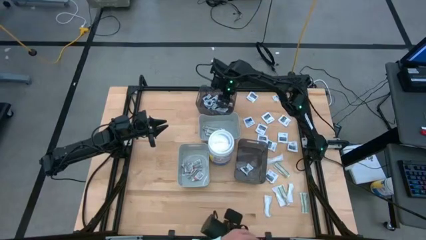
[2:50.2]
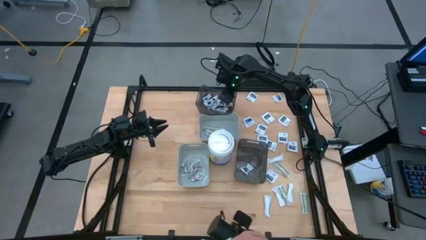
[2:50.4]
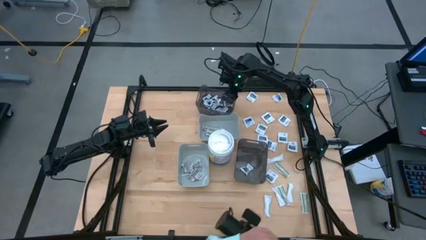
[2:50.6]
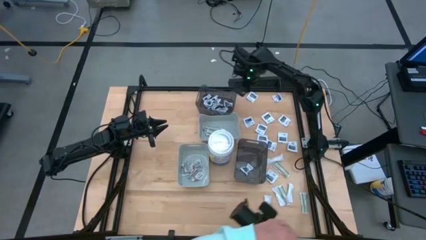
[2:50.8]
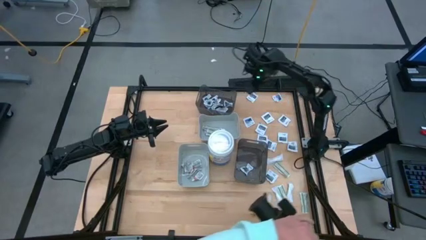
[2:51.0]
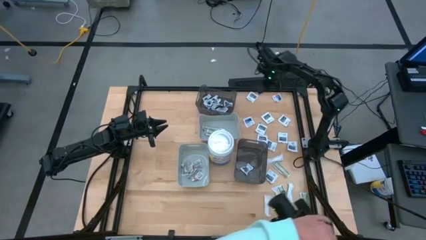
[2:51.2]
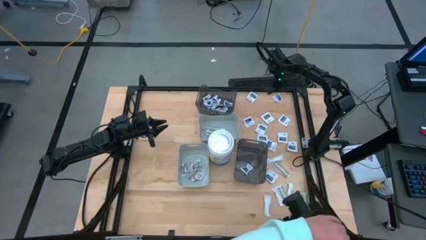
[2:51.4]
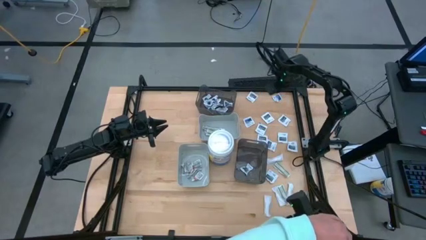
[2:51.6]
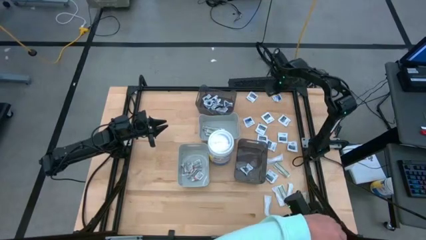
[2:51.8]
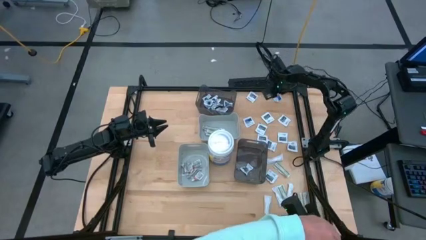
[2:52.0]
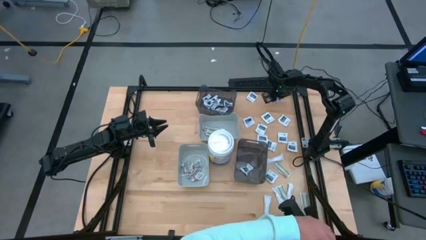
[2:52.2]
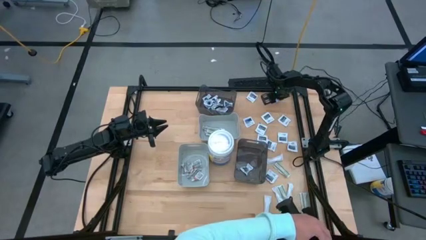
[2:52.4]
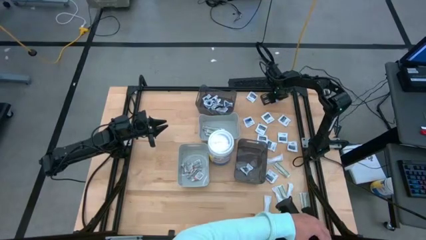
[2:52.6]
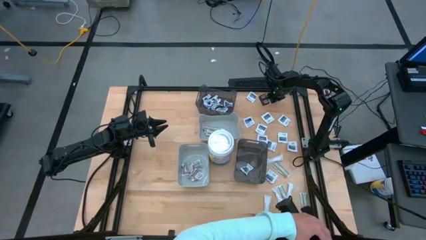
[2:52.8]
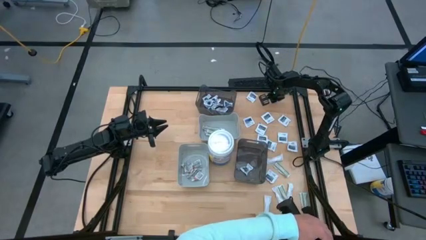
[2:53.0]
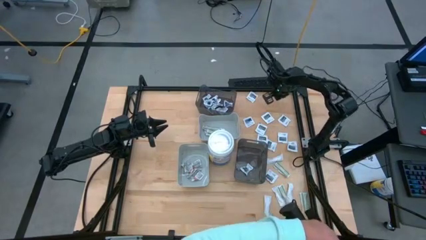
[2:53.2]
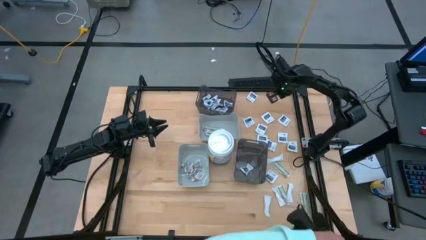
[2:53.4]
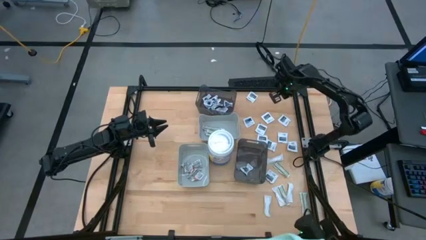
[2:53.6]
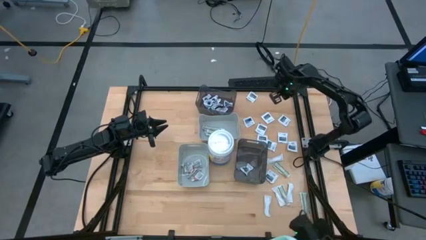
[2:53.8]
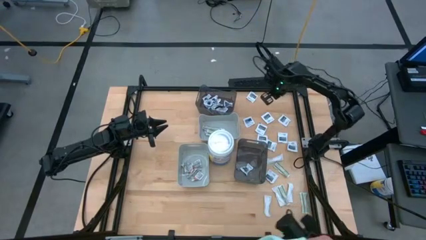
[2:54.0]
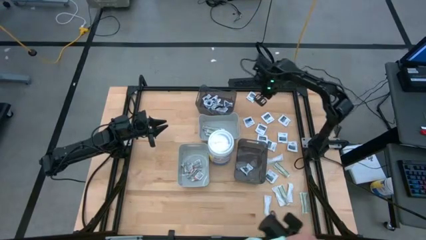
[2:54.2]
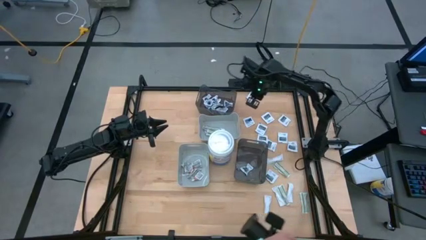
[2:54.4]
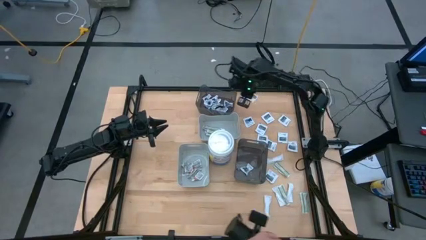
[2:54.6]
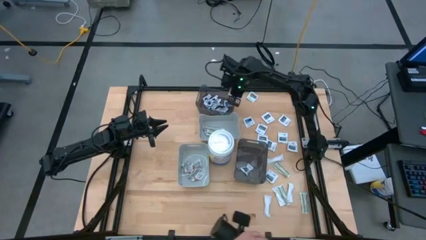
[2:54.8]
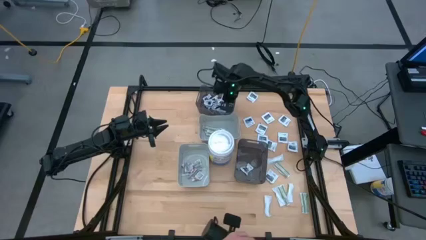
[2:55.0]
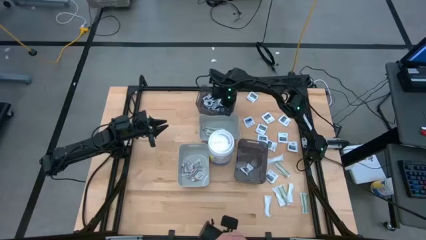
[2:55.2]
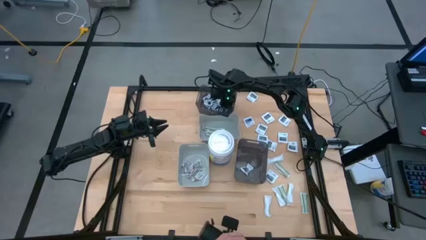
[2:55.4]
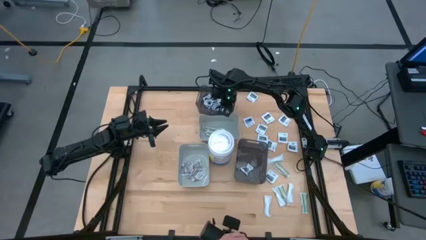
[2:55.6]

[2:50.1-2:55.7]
Task: Pick & Place First Aid Supplies
Put the alcohol pad into the top transparent black bin

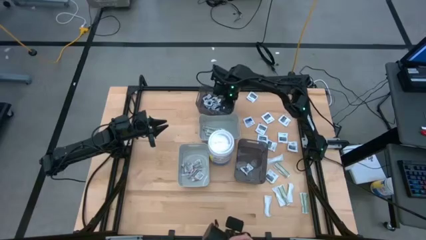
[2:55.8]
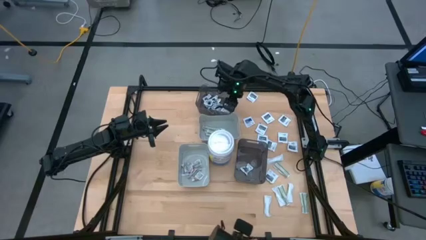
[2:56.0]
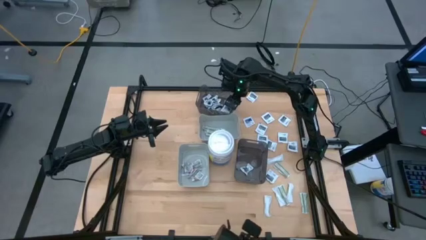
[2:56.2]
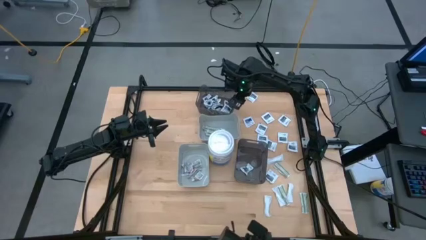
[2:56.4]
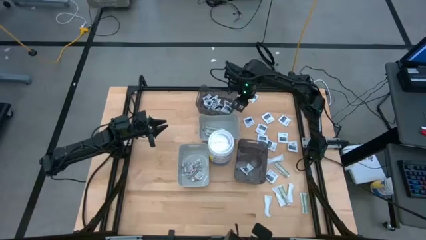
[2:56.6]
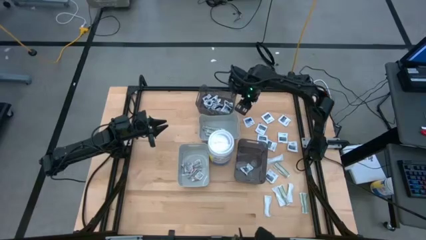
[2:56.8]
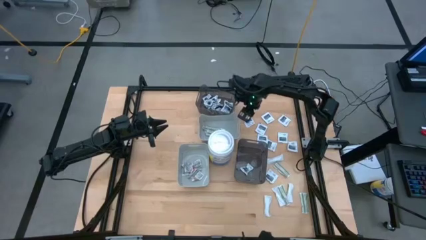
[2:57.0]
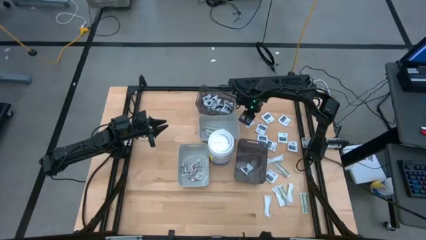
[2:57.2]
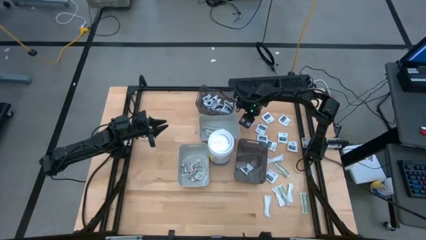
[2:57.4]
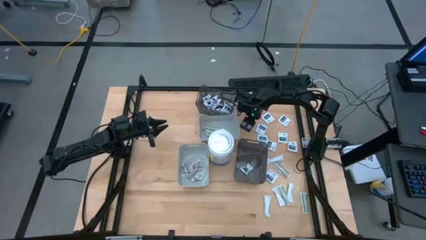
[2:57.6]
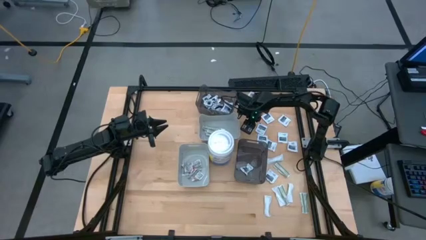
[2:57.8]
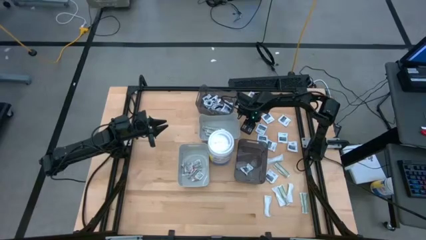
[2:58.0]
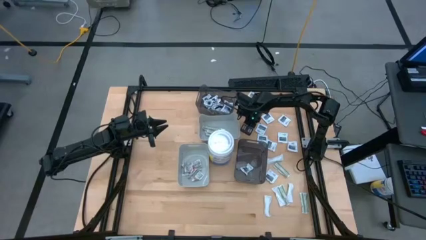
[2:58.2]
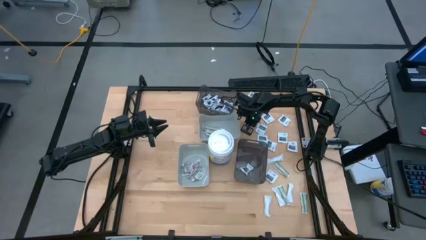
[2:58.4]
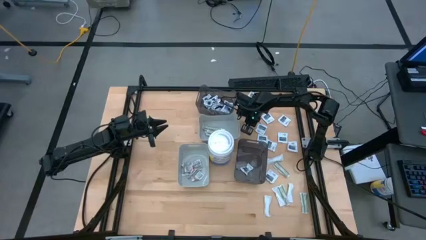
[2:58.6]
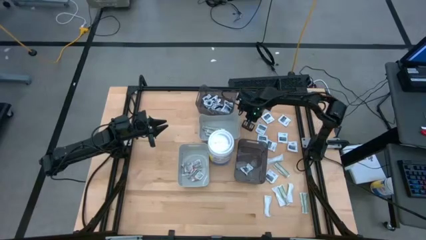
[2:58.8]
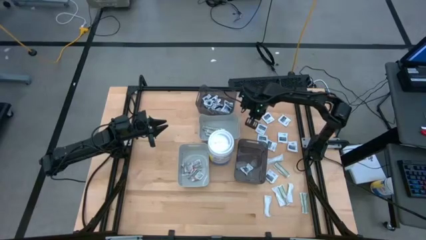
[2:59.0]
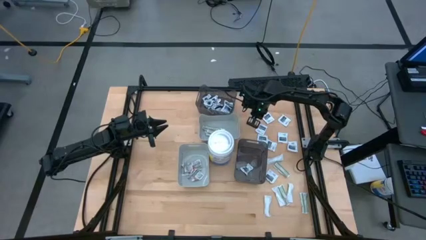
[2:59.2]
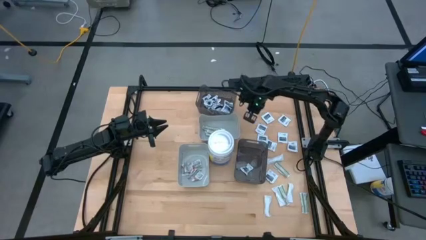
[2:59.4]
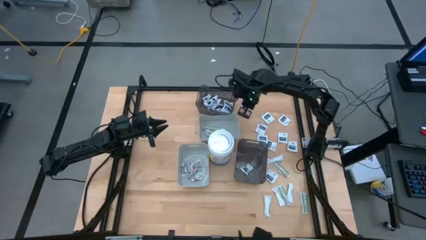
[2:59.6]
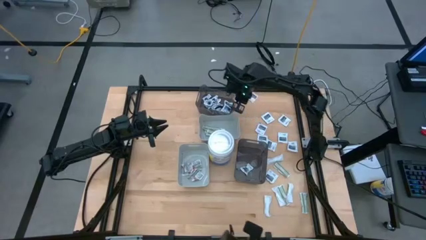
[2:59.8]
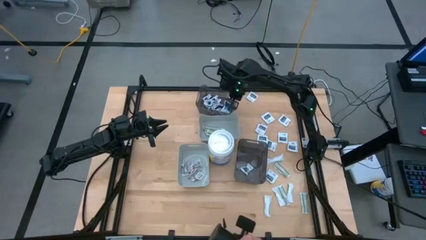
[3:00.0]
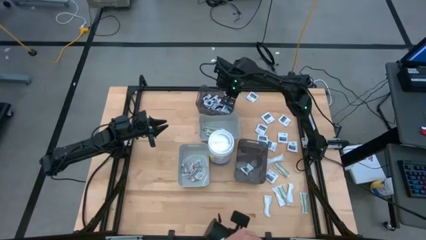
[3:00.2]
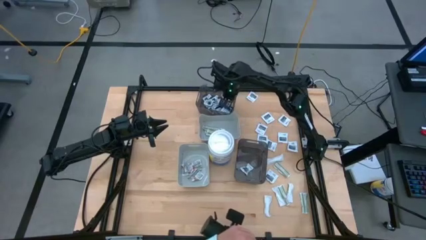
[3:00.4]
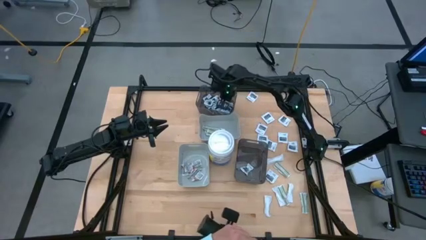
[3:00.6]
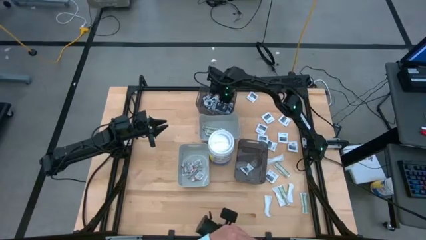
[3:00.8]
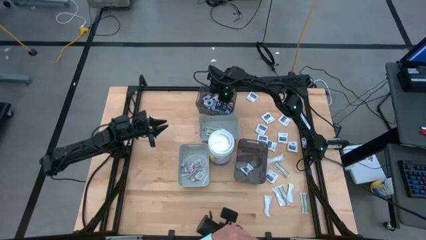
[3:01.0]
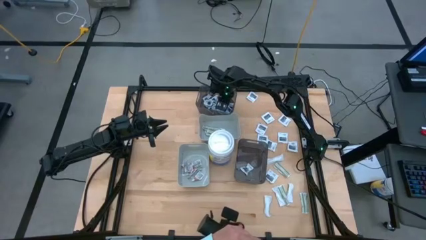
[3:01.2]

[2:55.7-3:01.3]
Put the alcohol pad into the top transparent black bin

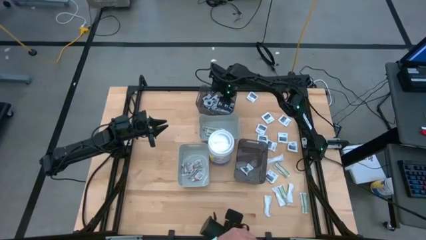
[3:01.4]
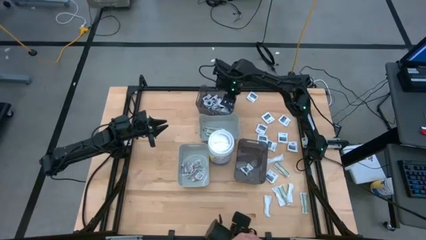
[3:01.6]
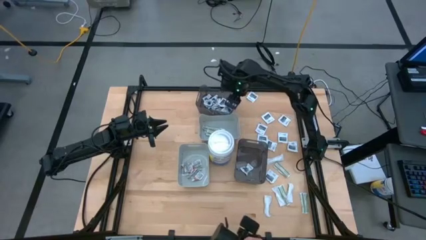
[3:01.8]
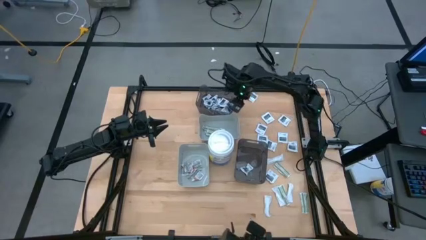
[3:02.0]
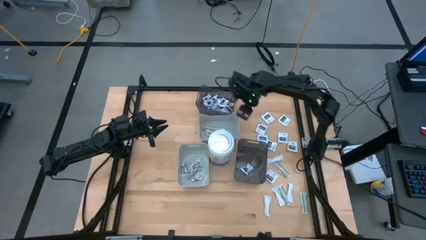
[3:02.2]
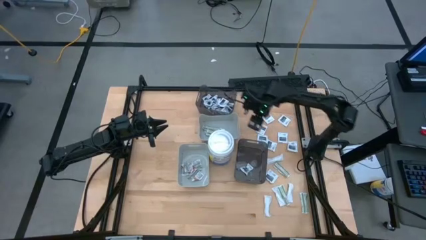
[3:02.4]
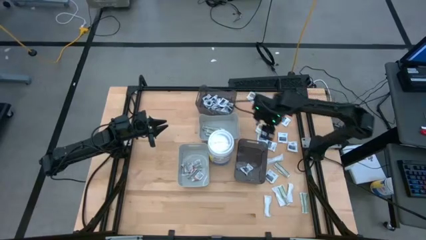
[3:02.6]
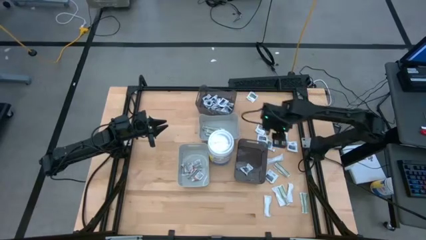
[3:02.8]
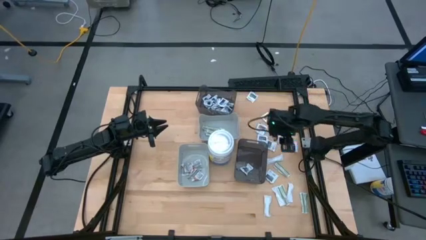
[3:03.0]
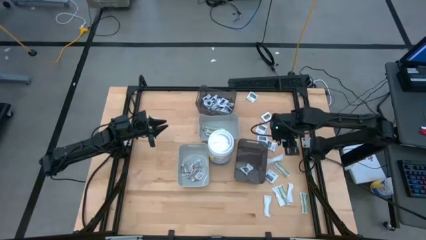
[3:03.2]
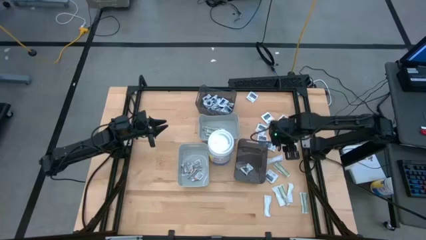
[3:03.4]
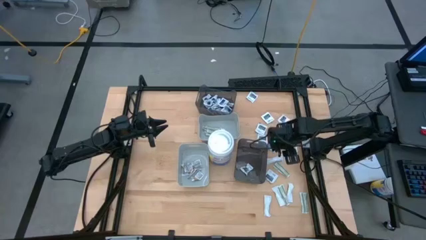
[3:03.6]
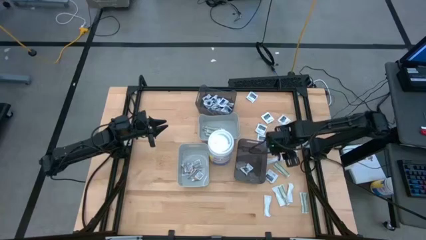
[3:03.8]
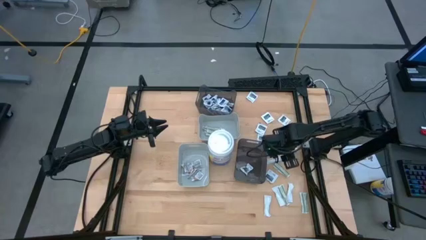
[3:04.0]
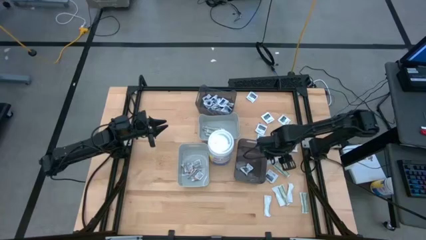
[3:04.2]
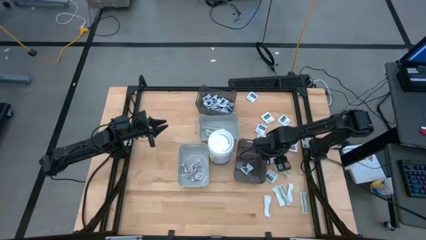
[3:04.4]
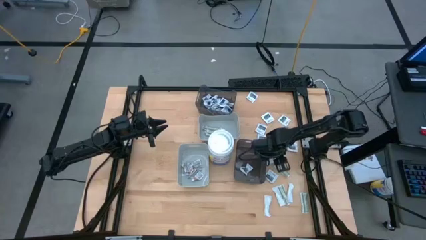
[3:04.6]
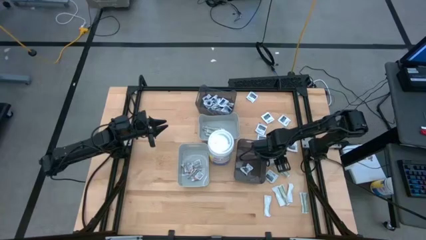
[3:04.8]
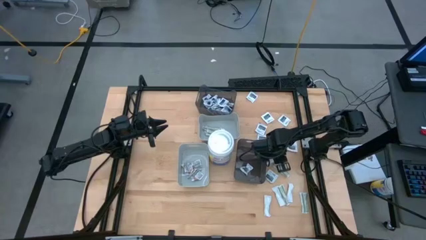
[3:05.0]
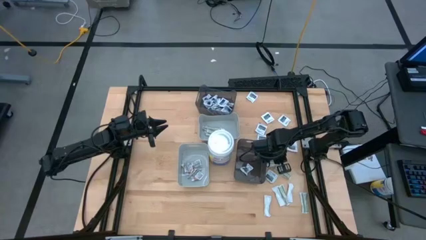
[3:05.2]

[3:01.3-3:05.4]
Put the bandage into the top gray bin

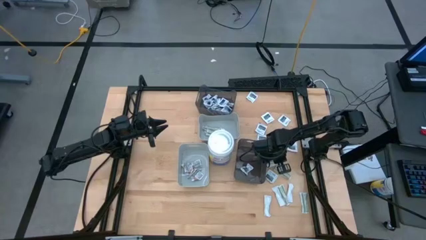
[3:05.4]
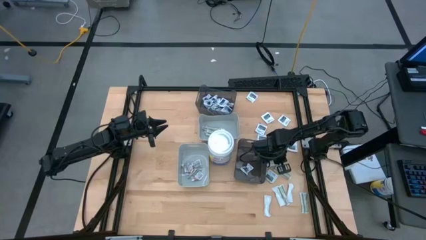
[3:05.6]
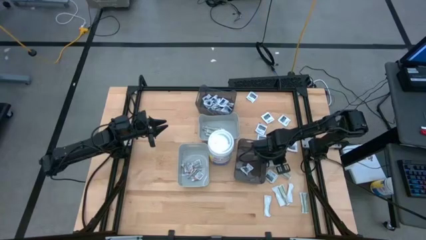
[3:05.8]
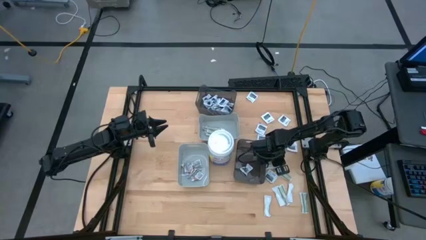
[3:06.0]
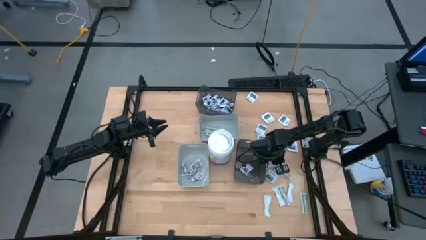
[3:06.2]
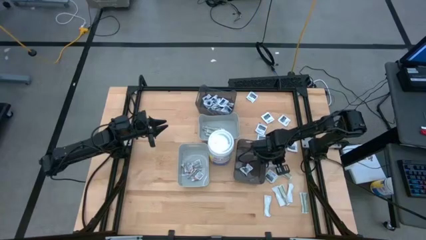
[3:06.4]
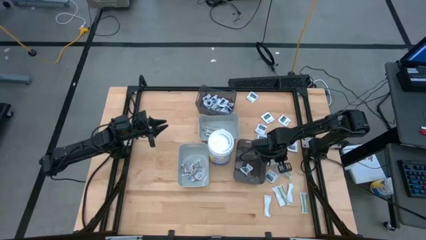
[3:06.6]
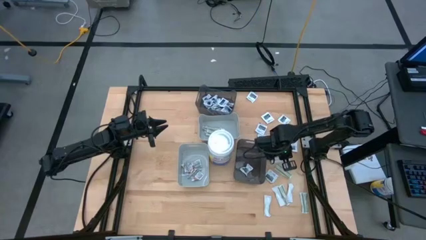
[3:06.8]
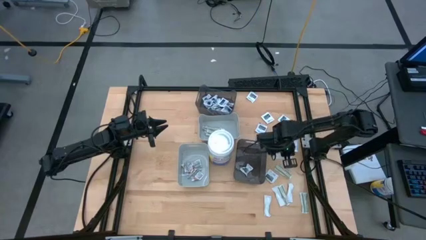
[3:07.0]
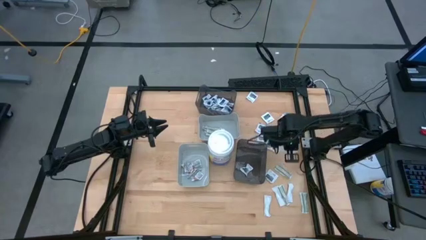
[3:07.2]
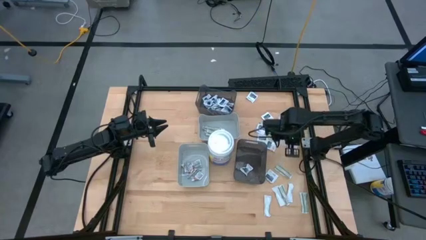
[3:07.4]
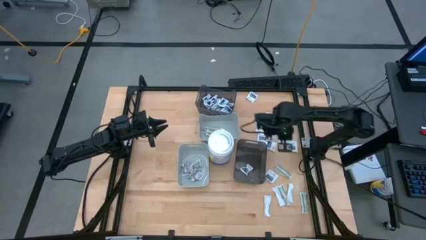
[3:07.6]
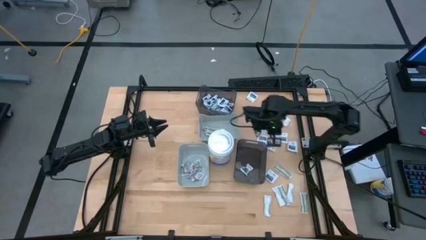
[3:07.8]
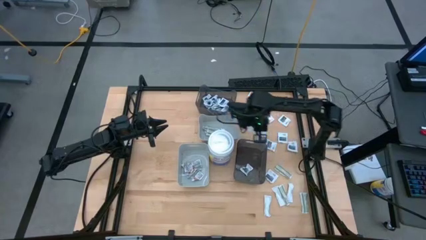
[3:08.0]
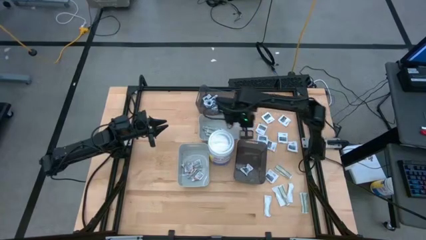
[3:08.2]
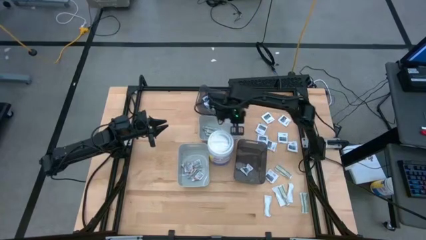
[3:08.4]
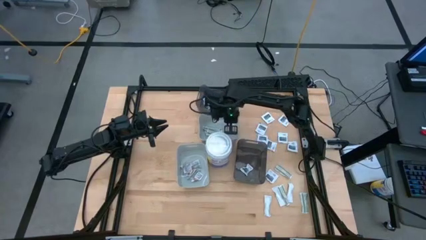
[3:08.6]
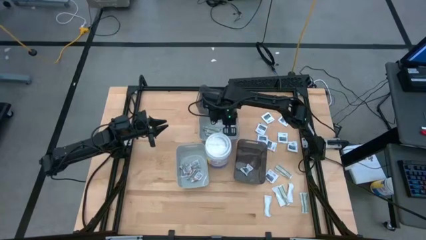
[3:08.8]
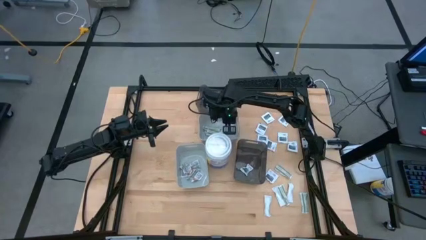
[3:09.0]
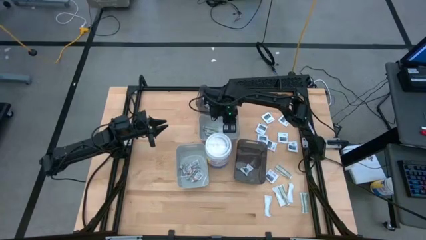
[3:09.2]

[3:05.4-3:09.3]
Put the bandage into the top gray bin
